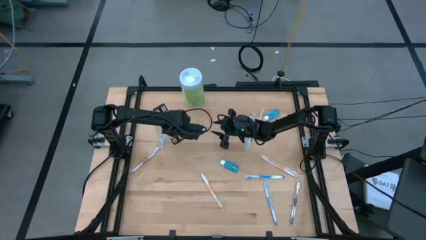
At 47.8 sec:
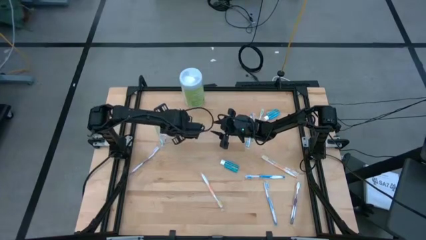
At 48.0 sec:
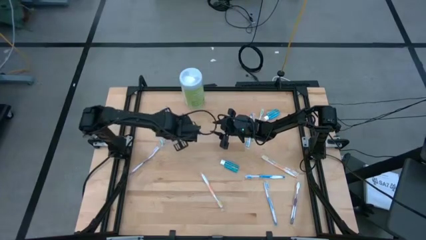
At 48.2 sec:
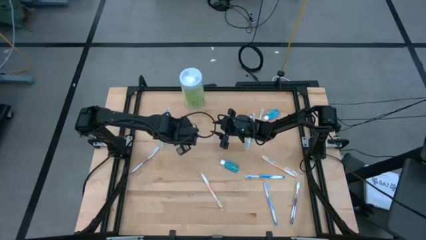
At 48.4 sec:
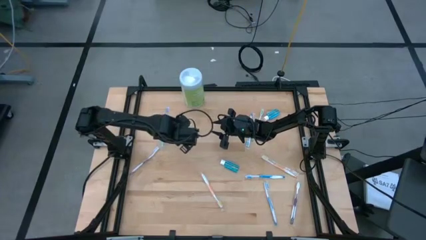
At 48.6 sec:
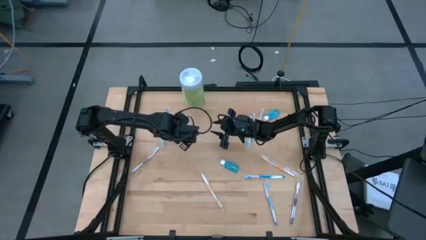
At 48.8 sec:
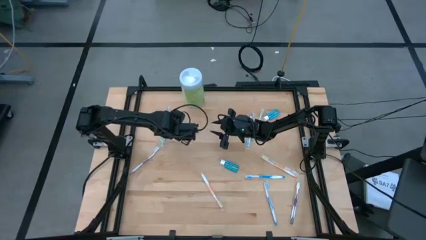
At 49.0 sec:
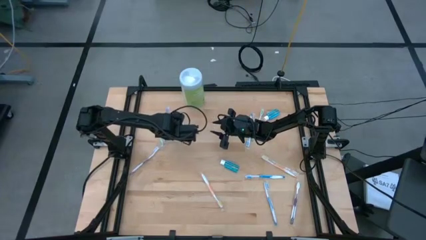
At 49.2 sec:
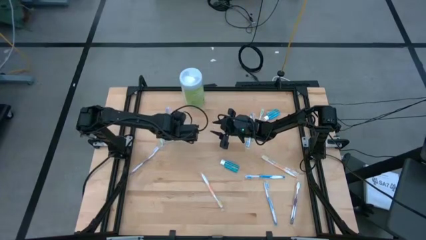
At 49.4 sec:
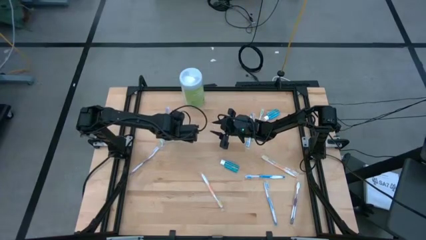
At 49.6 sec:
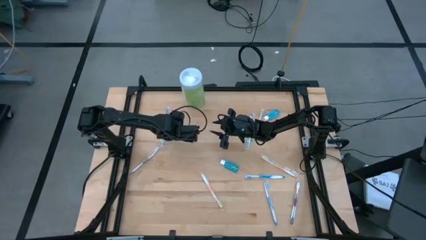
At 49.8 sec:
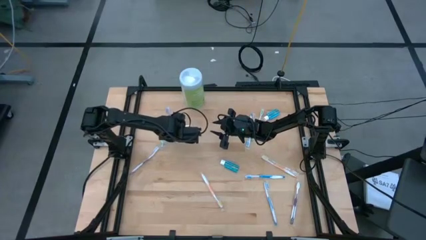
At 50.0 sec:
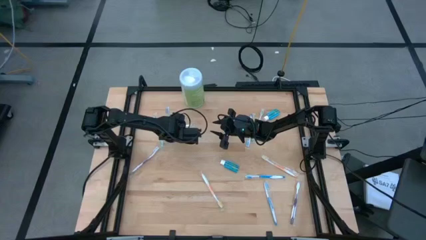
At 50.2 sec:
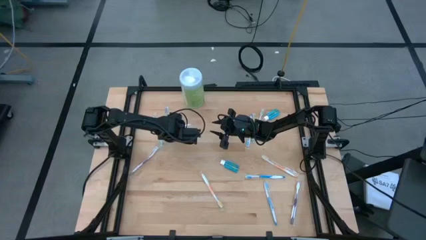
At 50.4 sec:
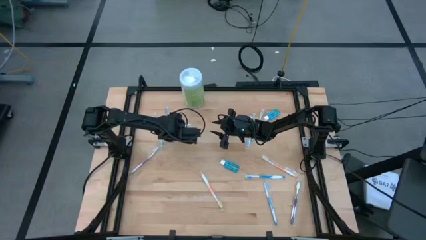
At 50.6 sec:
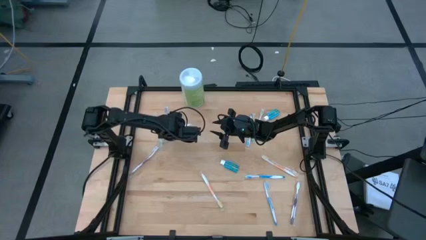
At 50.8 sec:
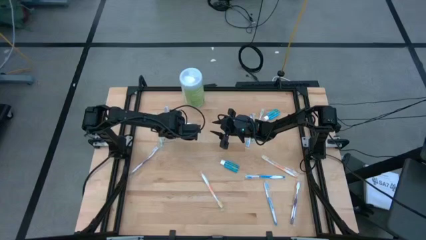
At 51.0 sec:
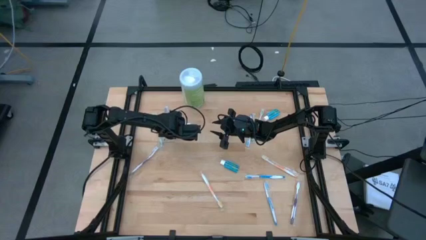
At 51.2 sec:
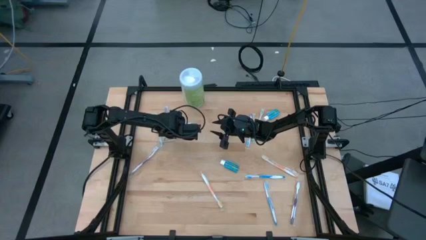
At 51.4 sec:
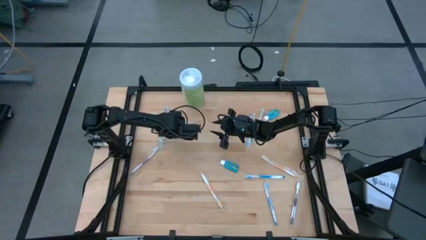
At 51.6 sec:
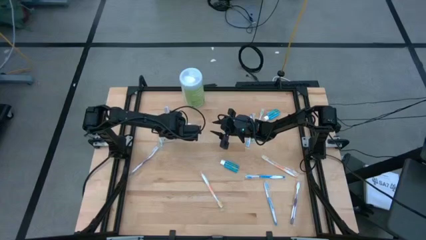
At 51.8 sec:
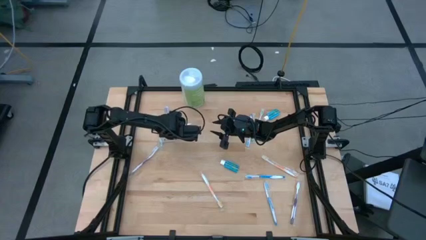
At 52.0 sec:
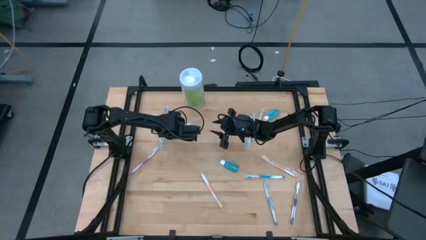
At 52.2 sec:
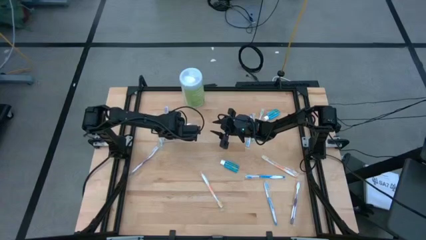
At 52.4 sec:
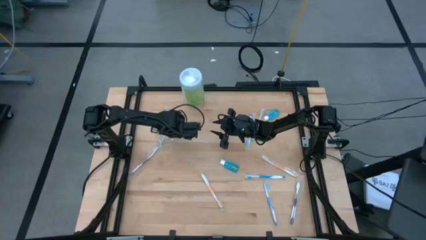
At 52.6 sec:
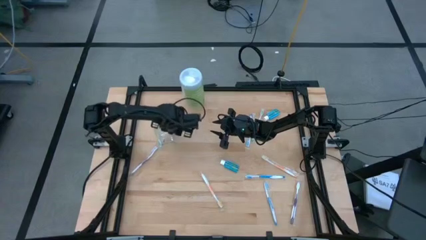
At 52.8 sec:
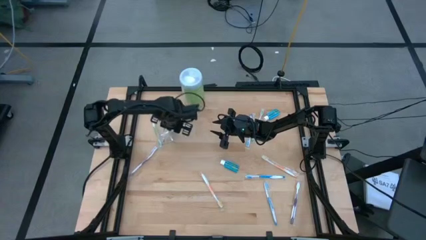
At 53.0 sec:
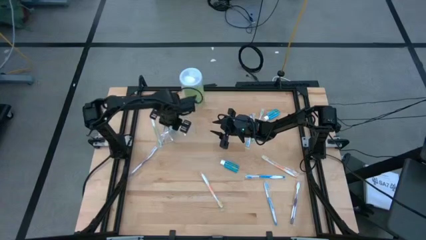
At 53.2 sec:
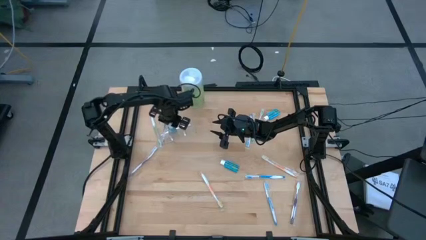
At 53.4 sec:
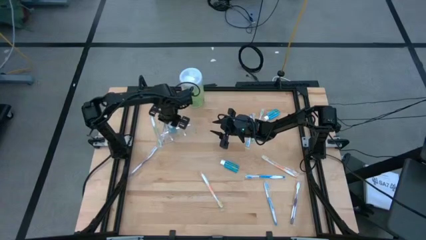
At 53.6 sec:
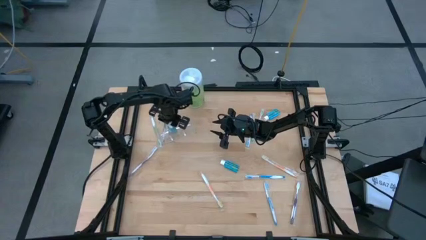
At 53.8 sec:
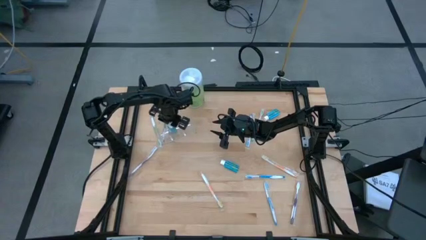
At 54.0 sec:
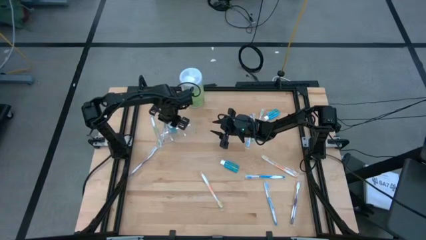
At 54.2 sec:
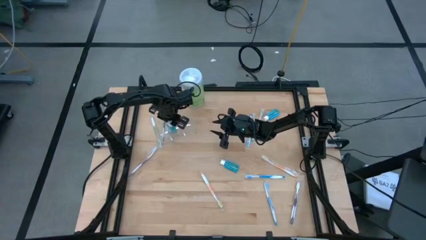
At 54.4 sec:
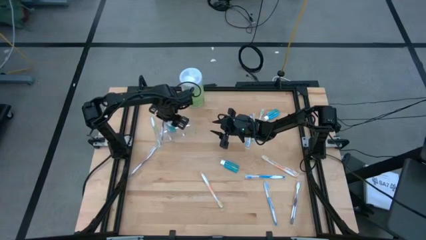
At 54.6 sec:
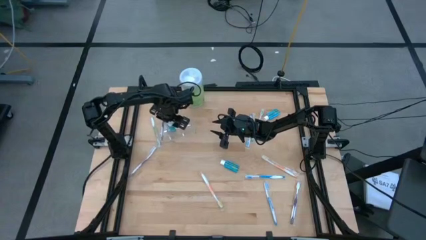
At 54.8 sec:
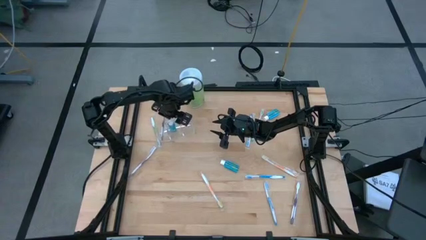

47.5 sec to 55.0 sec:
Task: Pick & Place toothbrushing station
Adjust the blue mouthwash

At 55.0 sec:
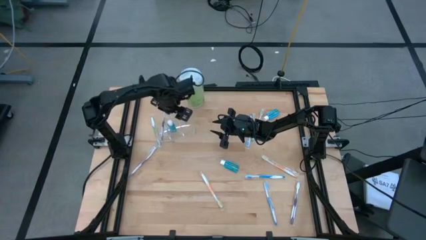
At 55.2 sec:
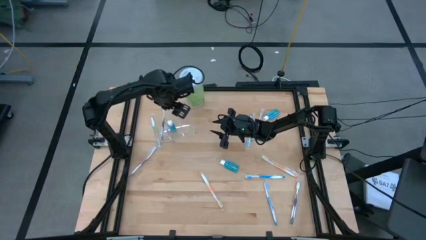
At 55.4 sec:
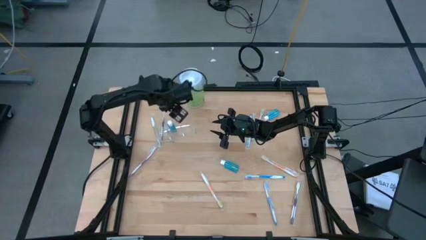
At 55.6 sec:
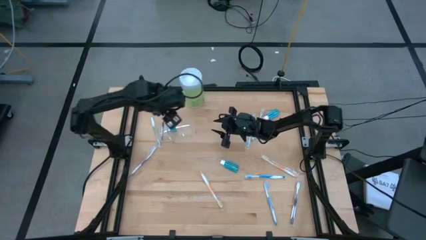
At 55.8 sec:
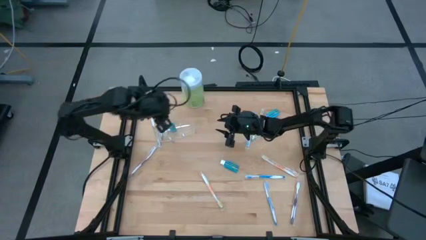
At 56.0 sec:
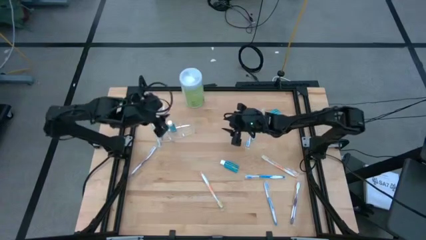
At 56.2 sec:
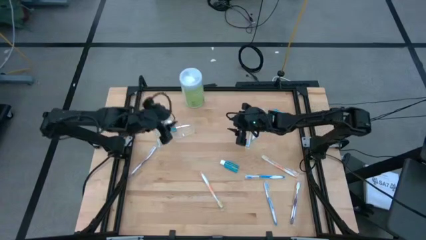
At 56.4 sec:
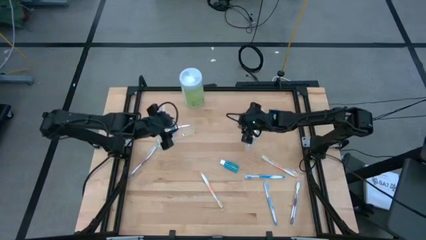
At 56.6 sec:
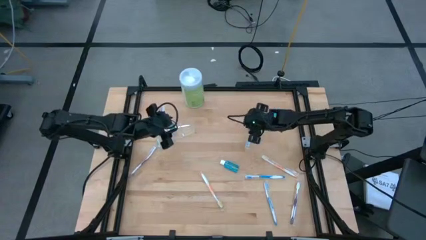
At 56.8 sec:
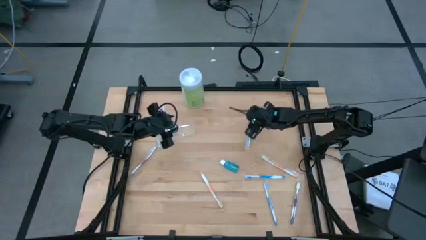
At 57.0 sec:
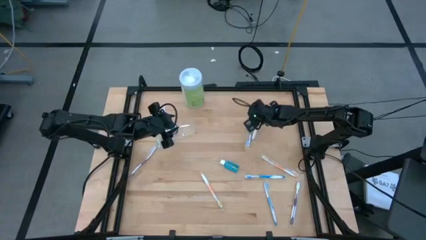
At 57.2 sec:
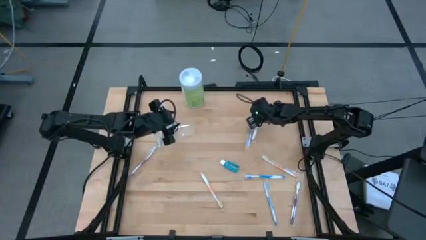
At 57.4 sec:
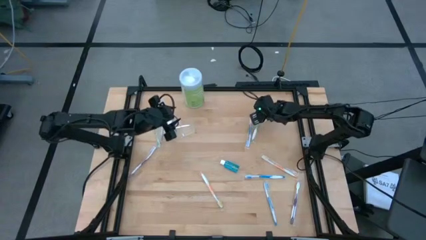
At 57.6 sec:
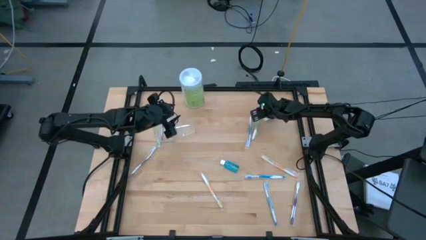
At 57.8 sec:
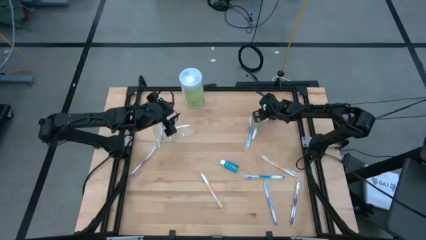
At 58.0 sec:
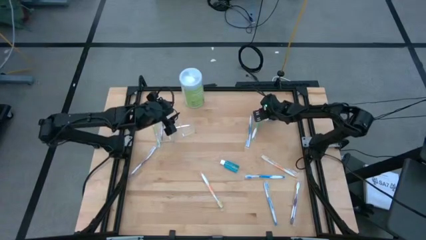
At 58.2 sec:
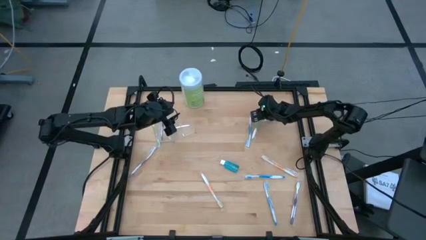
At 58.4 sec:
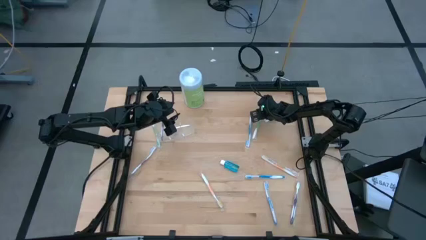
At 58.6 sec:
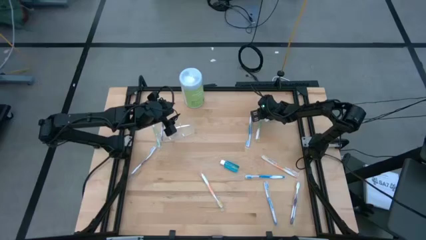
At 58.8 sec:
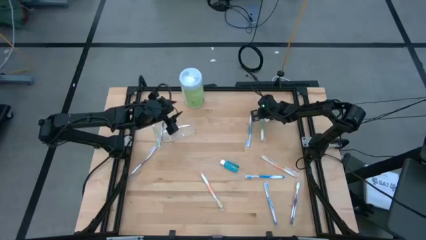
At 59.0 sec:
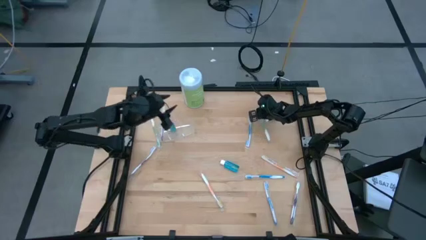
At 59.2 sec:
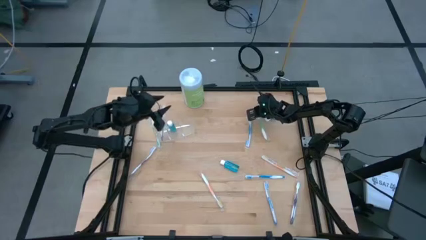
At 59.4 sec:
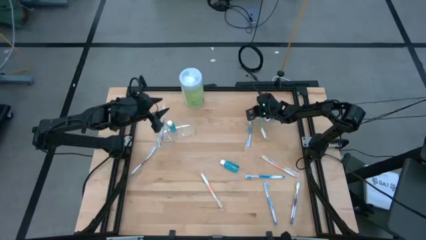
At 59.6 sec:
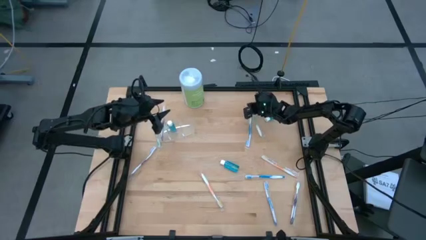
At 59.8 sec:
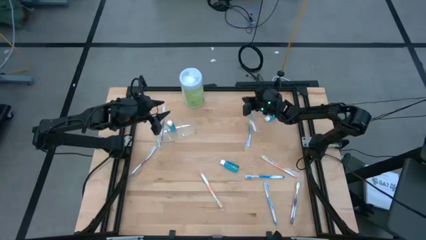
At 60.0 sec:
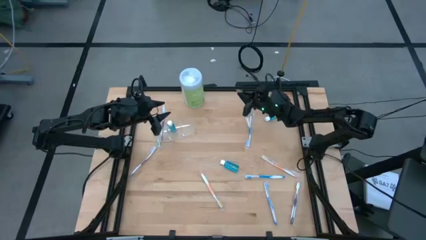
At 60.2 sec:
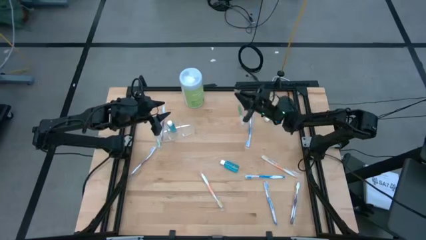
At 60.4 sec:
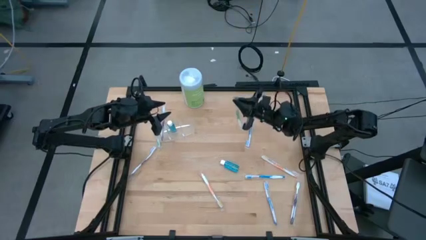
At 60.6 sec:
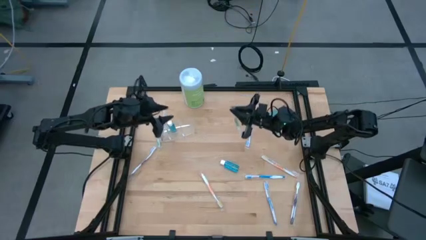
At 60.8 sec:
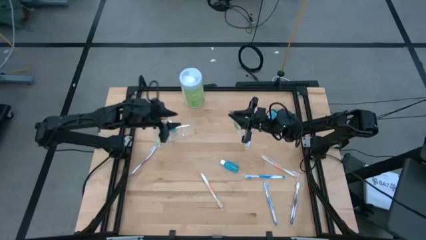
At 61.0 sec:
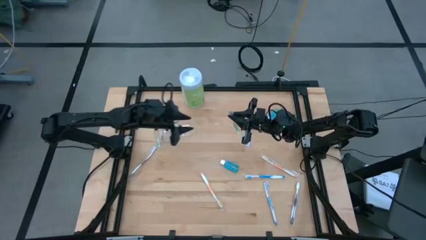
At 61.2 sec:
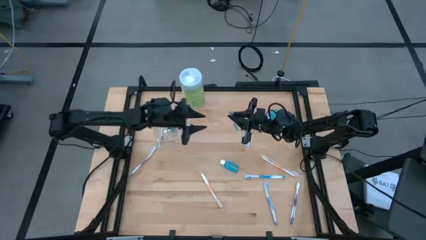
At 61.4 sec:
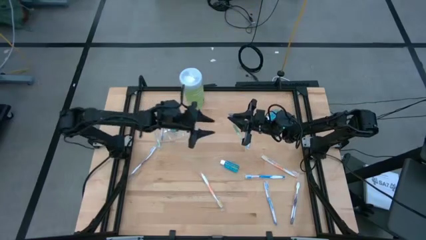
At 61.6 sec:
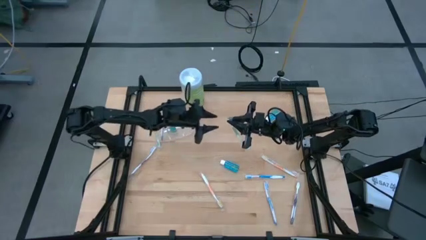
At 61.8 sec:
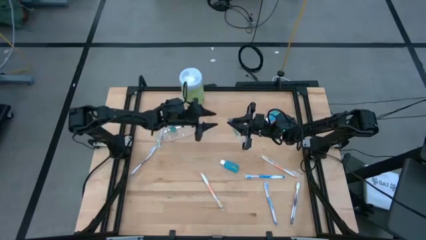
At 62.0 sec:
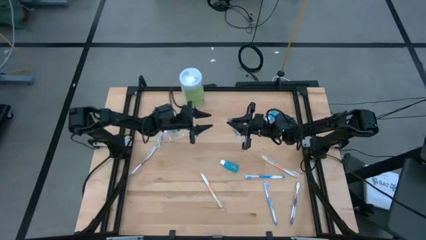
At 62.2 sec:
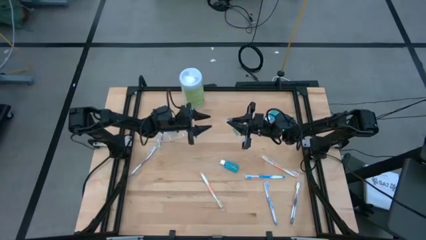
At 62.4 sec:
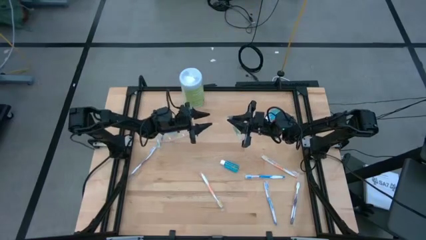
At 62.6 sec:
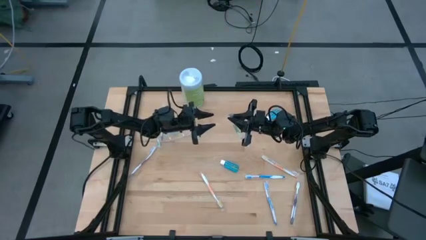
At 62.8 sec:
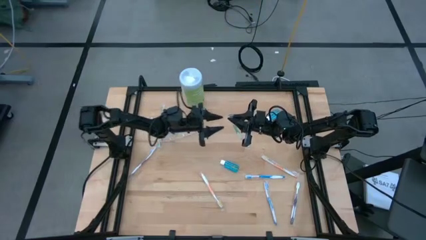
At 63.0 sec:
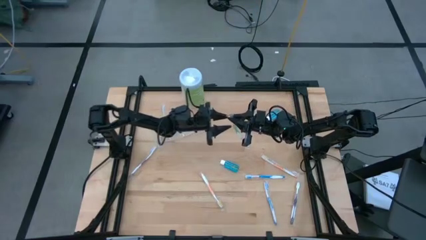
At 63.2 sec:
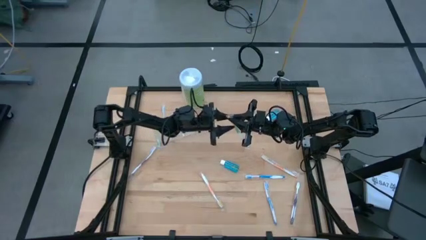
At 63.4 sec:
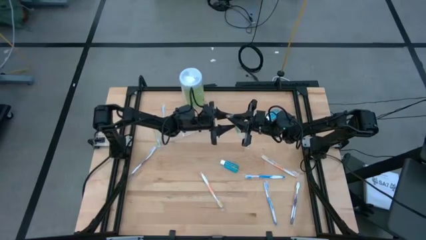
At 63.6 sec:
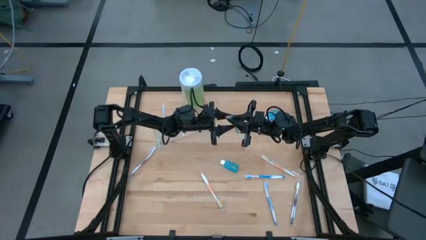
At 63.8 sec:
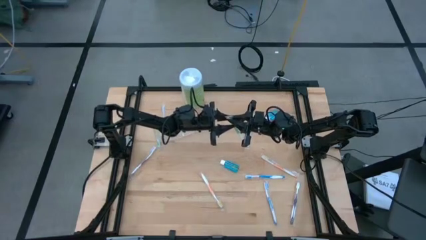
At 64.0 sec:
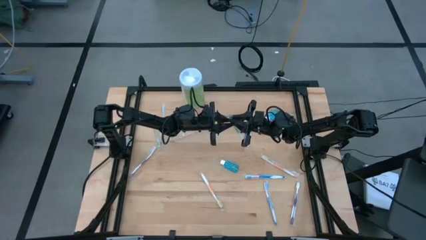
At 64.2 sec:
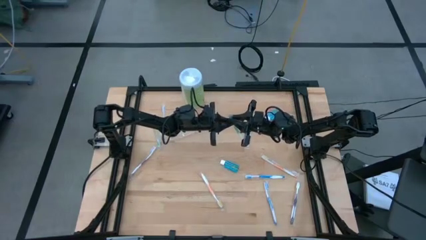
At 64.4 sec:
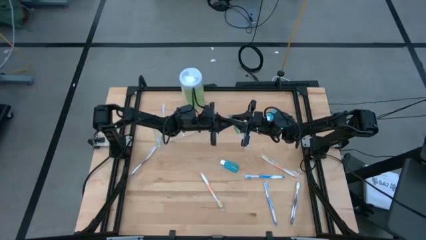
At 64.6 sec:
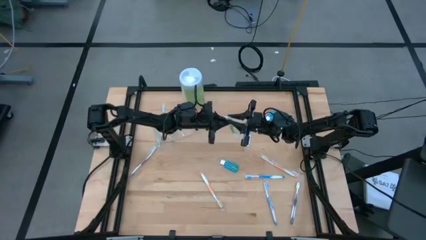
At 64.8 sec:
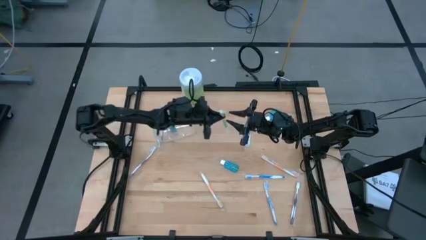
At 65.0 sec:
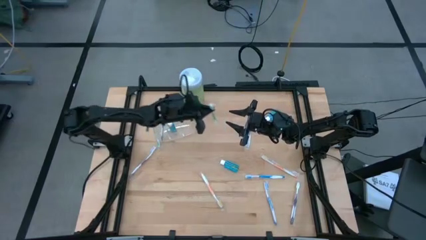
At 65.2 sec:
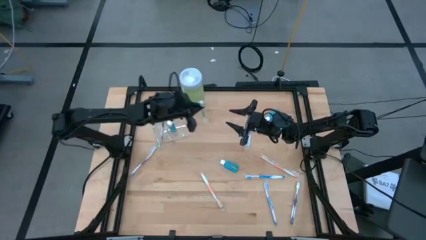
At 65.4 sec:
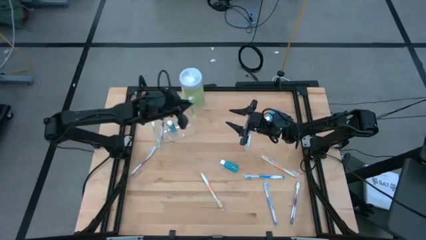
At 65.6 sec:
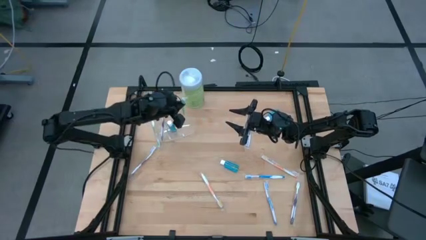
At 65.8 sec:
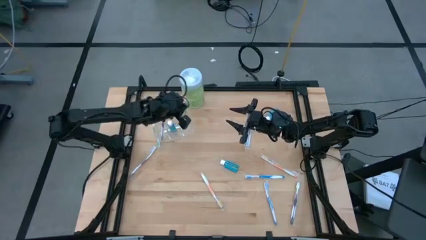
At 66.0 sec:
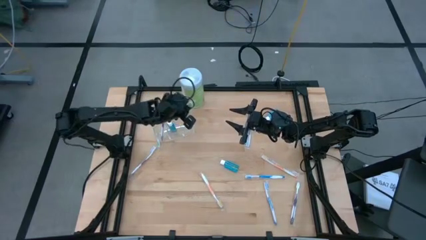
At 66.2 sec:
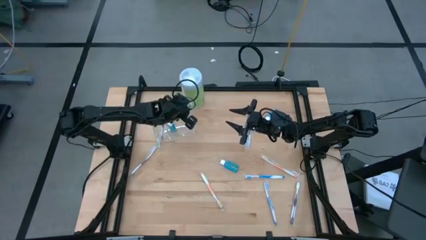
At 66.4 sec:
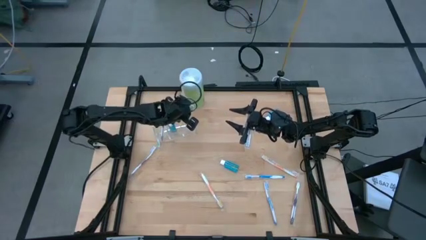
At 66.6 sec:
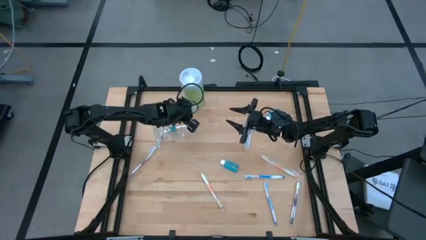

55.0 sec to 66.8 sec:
Put the right green toothbrush into the transparent organizer
